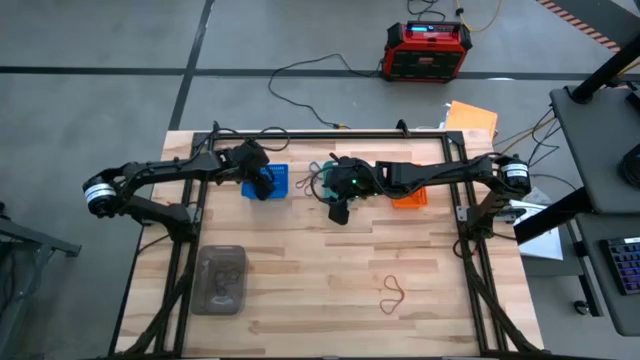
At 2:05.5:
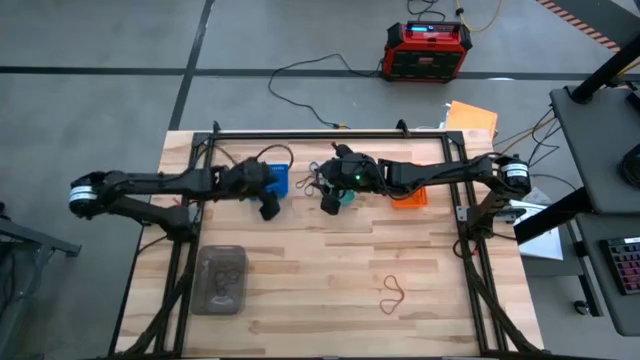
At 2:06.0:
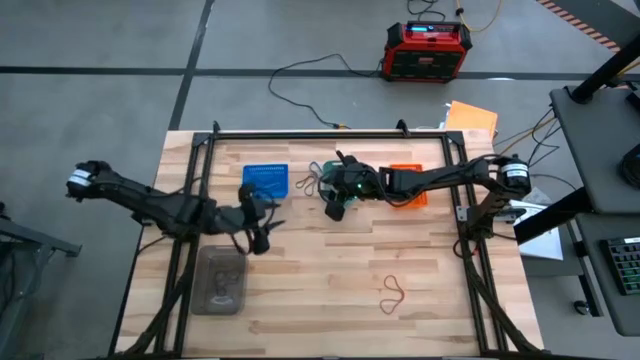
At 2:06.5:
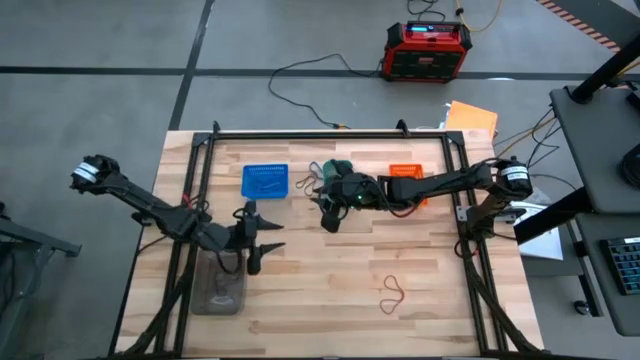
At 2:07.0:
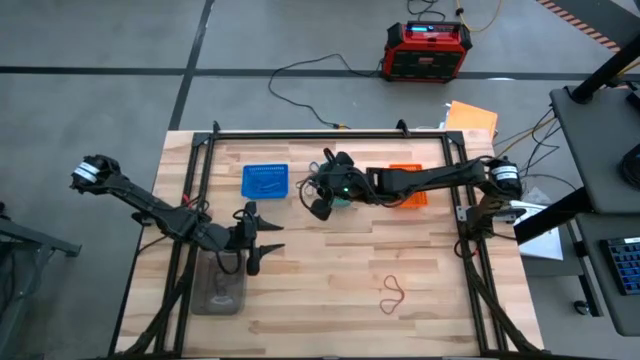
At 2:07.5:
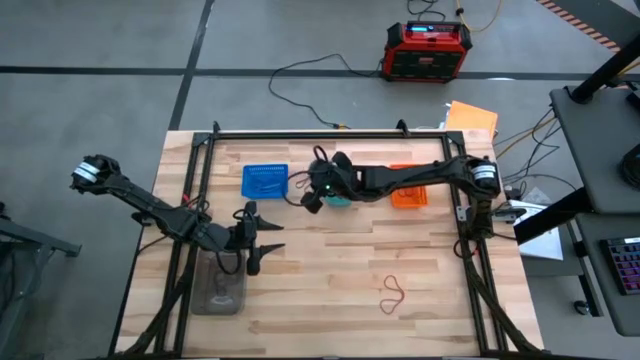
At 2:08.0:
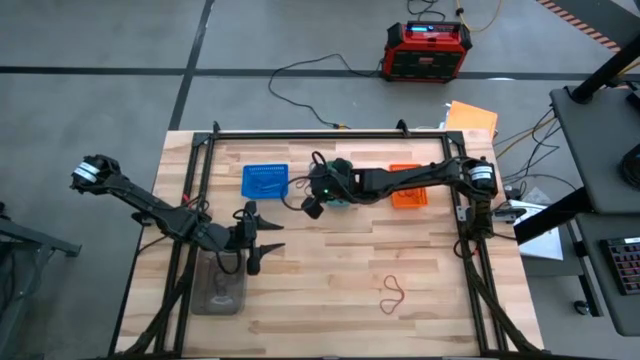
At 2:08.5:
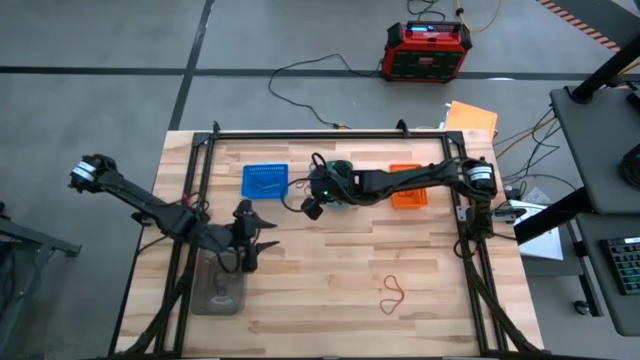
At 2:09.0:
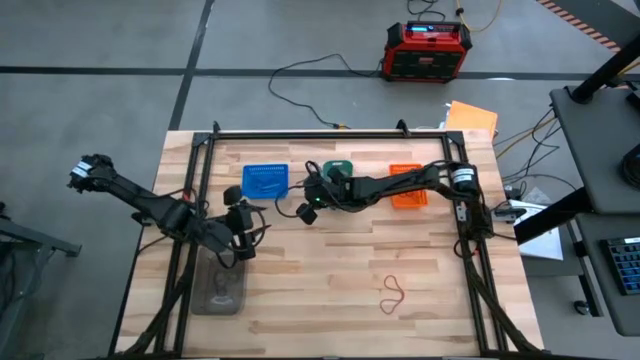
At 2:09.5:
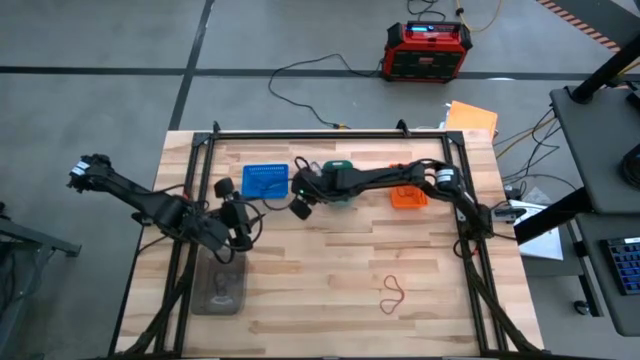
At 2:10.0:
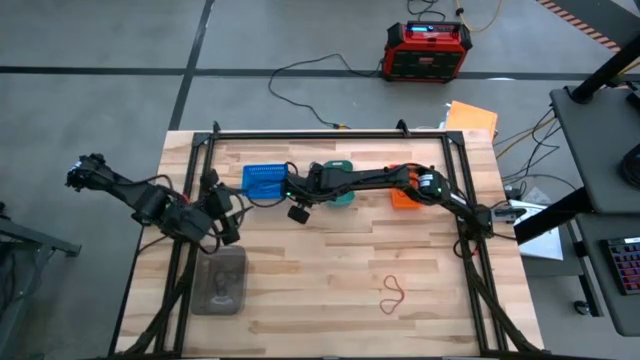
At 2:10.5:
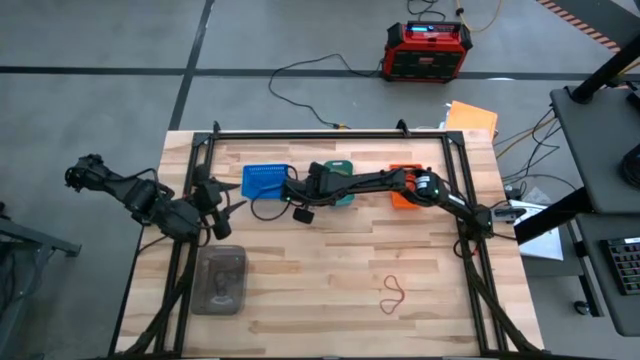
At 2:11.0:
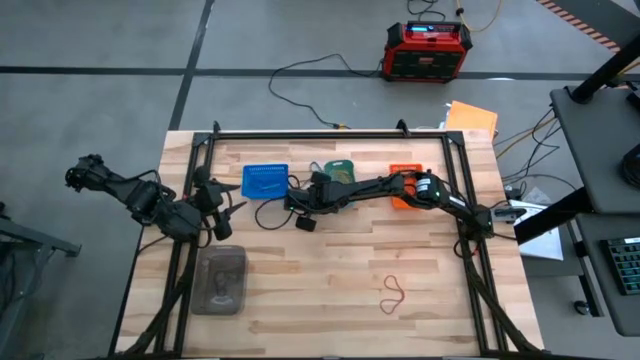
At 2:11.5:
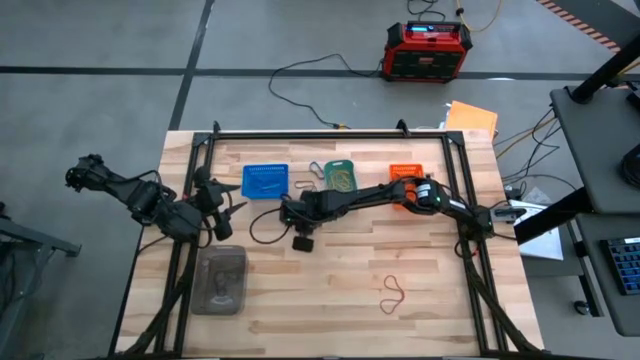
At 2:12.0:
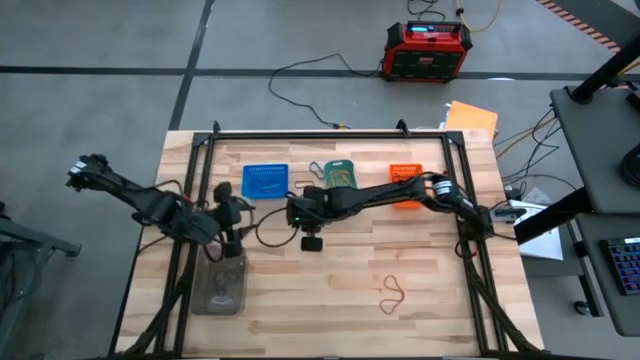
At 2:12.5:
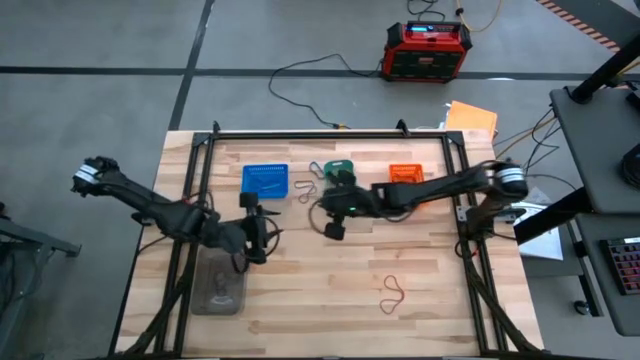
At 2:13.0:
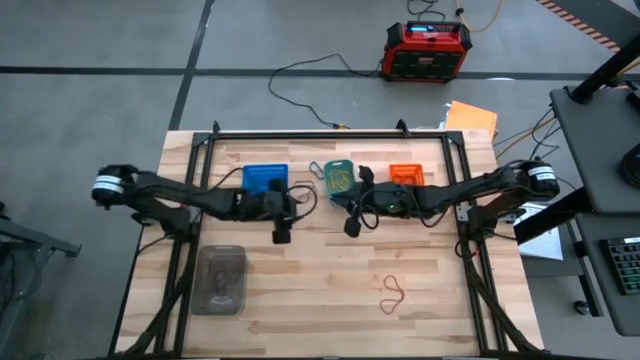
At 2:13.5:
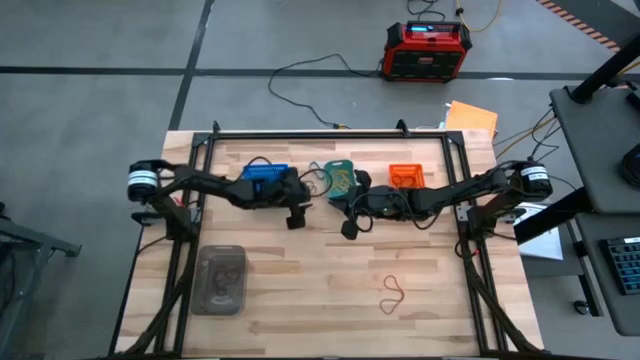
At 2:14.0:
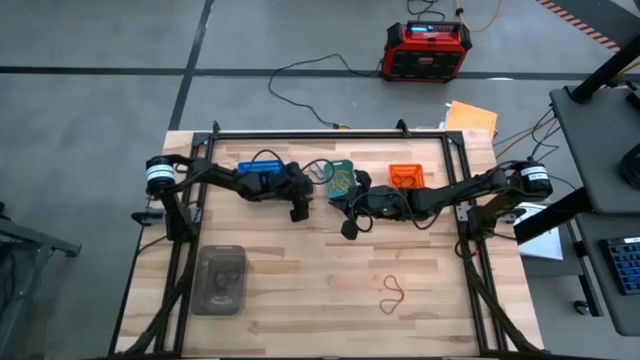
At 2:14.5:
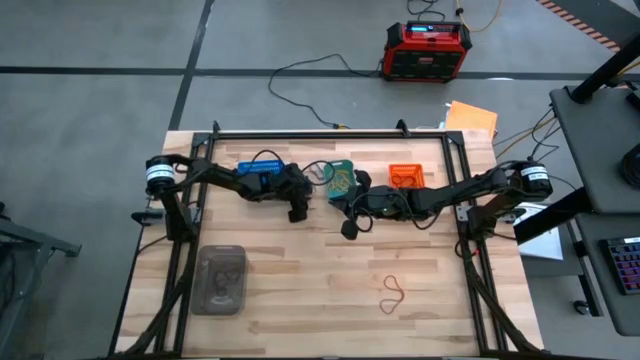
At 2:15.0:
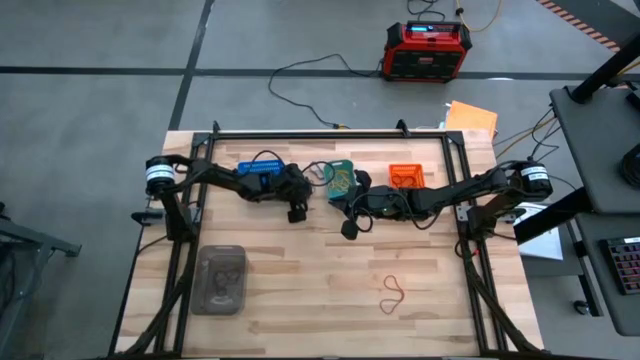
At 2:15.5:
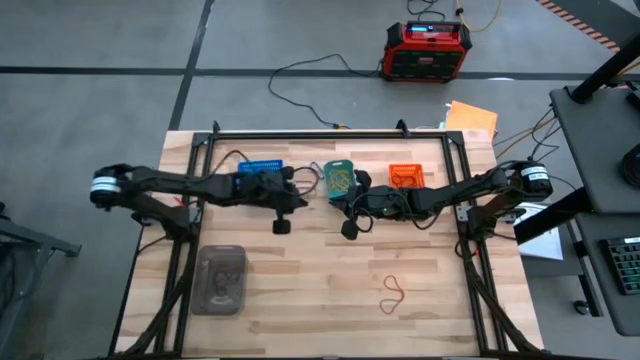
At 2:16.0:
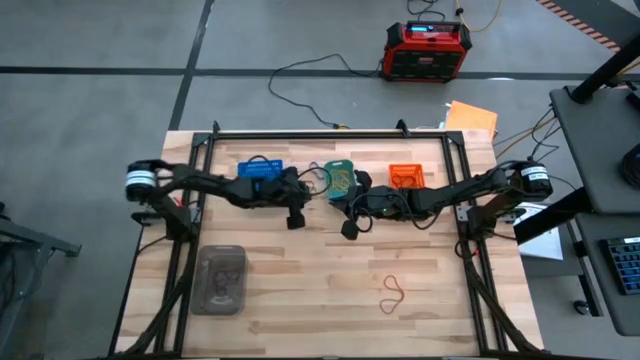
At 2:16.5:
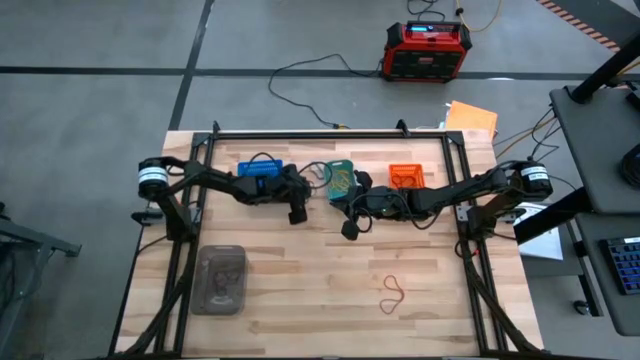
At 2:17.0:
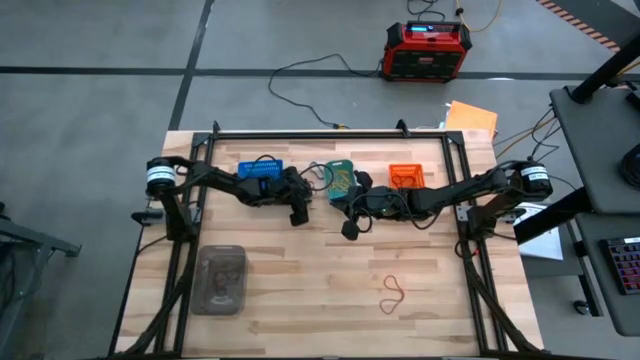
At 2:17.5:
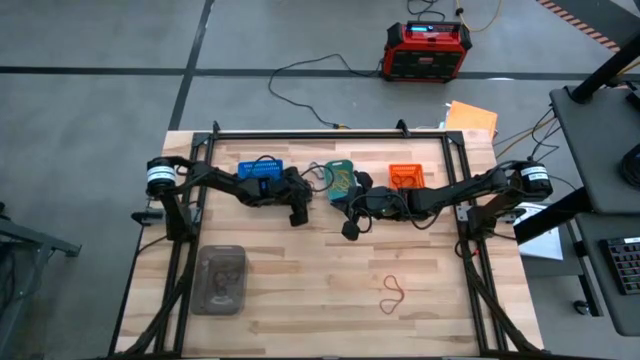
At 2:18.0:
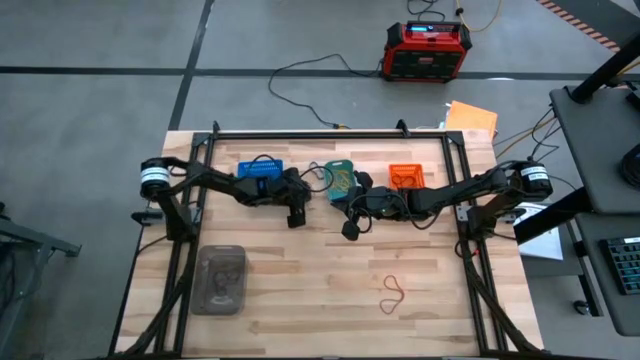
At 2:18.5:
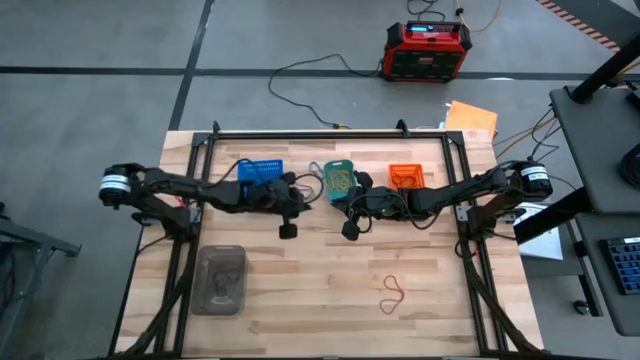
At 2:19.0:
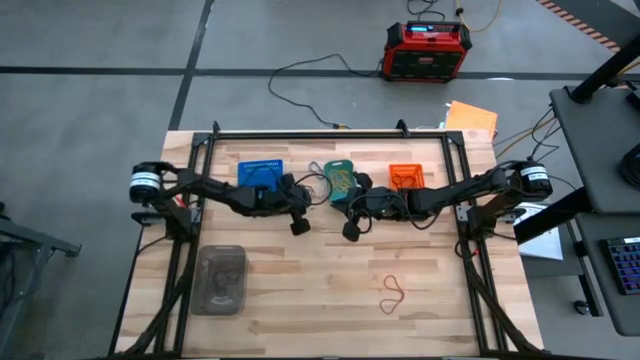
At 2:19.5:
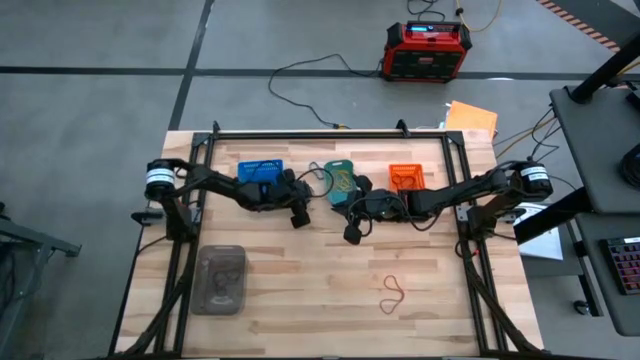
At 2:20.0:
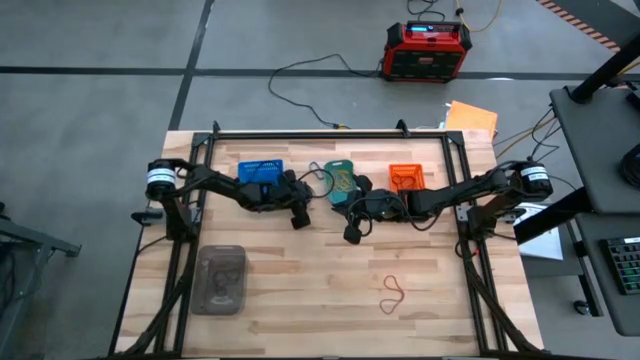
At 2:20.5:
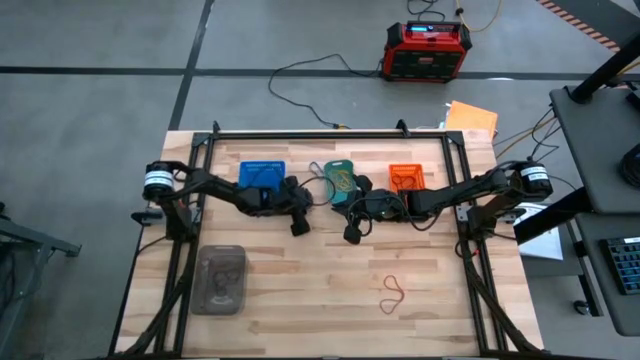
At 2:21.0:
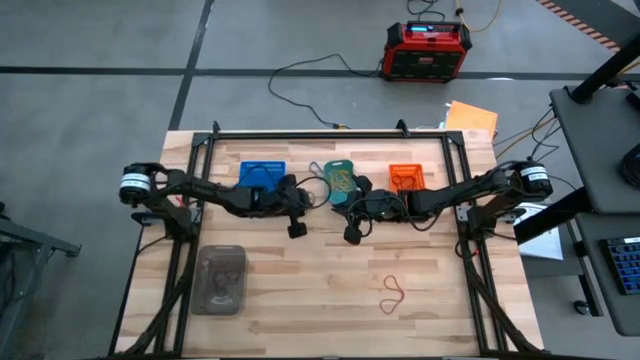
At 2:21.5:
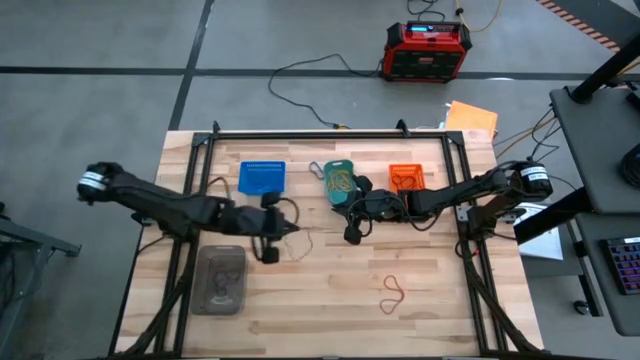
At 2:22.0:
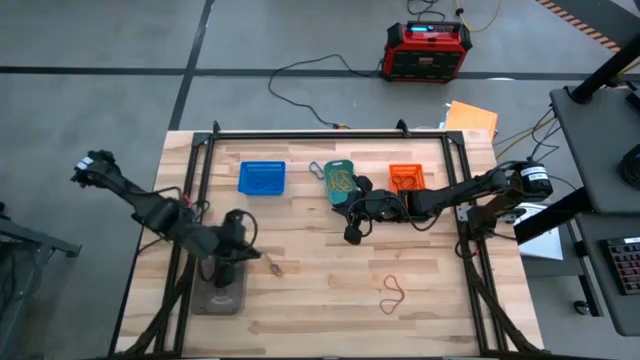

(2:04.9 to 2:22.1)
Task: Sort rubber bands into baskets
Put the black rubber band into the black bin

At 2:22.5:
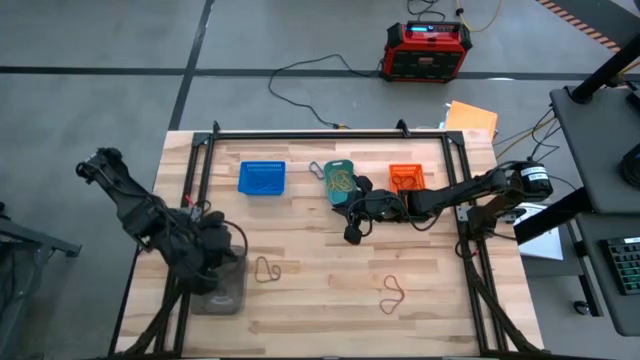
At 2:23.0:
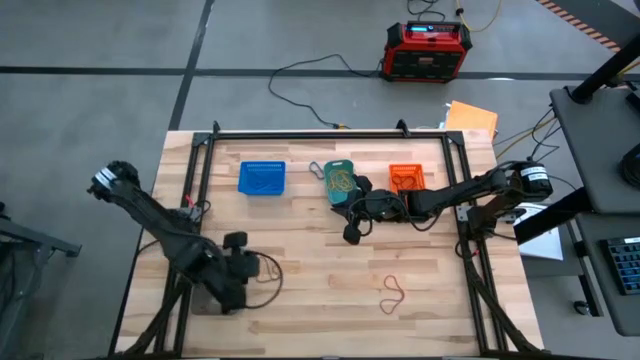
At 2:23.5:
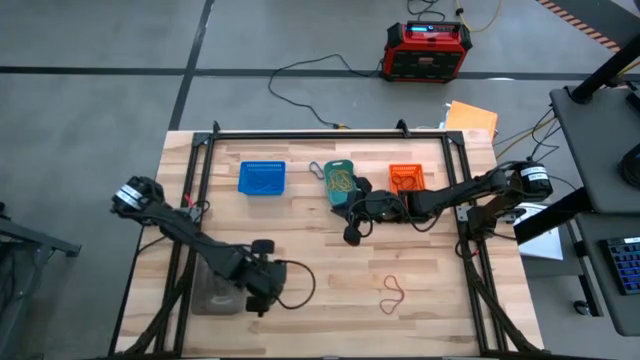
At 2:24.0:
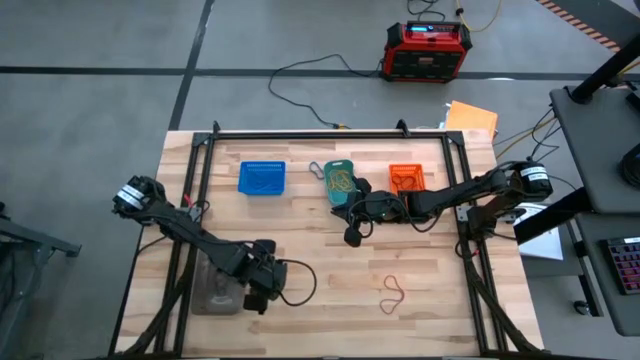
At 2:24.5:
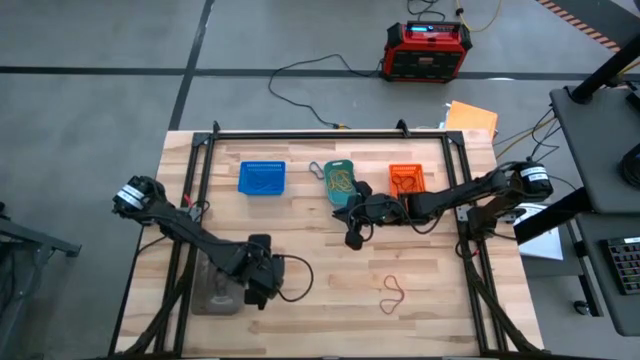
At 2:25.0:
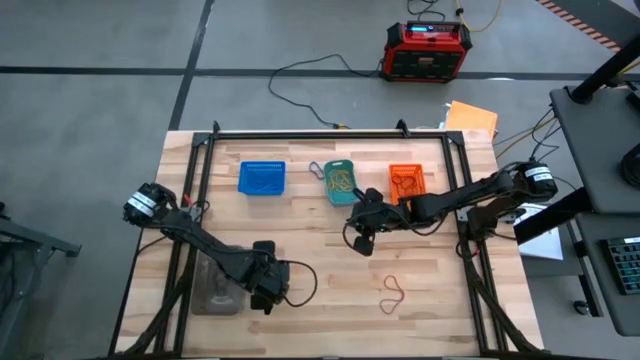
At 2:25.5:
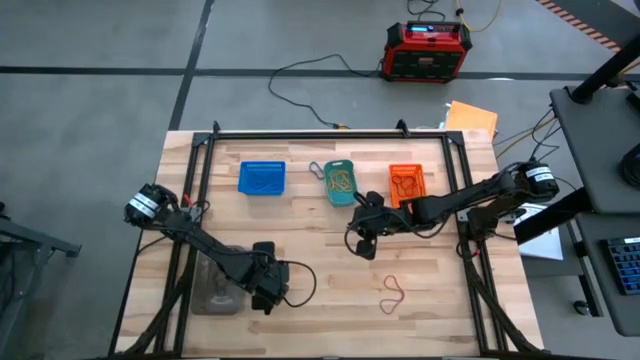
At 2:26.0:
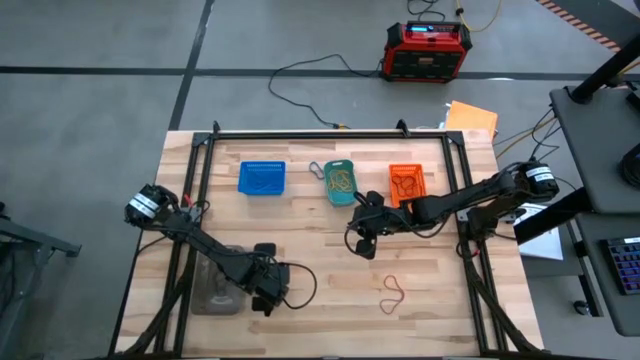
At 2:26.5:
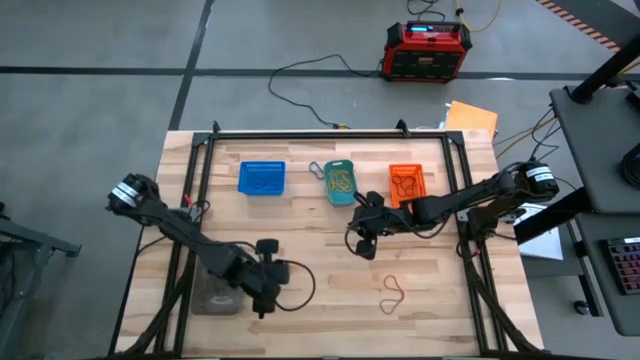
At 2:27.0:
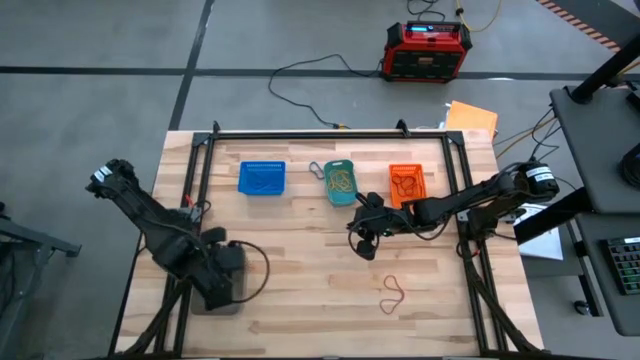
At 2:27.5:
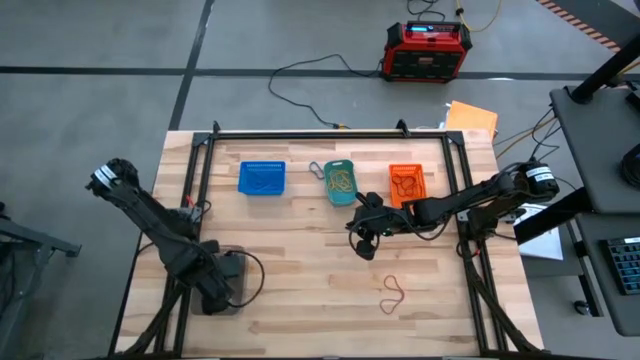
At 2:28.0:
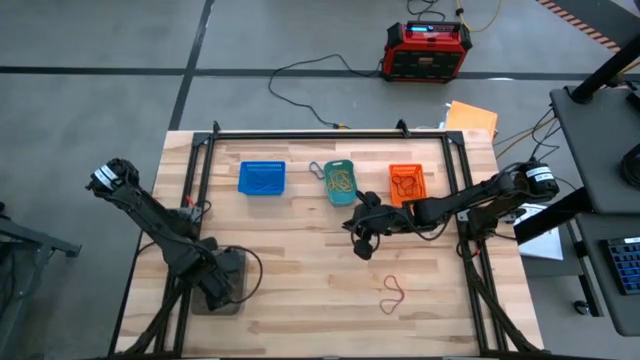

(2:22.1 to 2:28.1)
Put the black rubber band into the black bin
